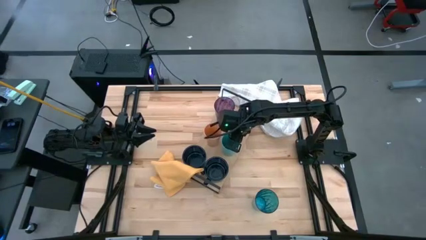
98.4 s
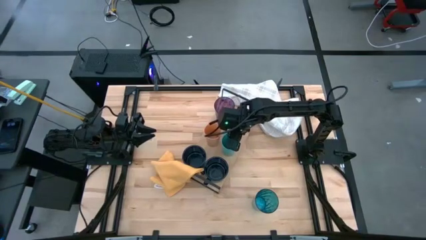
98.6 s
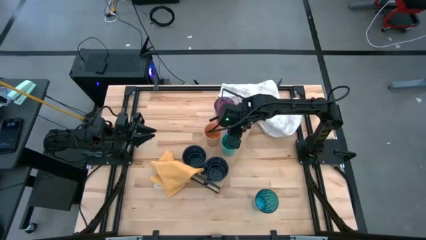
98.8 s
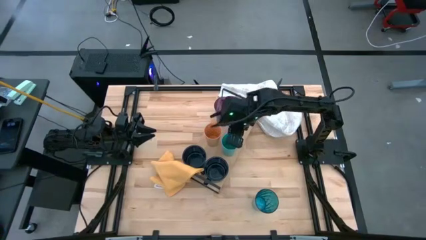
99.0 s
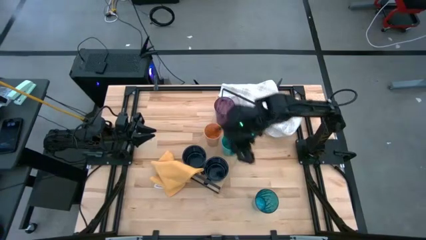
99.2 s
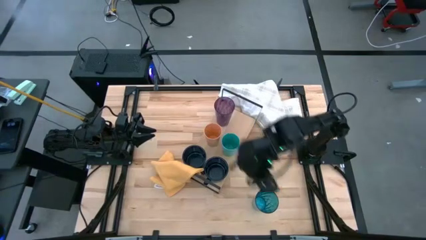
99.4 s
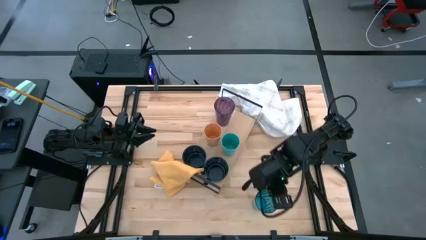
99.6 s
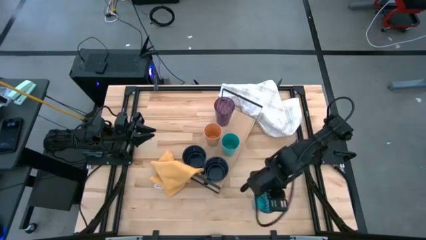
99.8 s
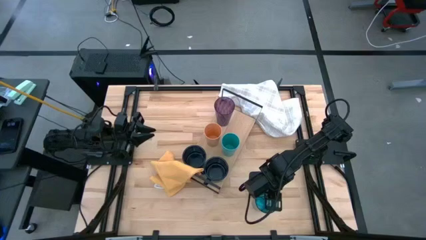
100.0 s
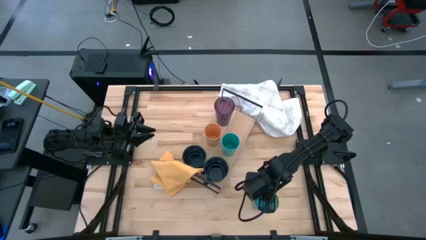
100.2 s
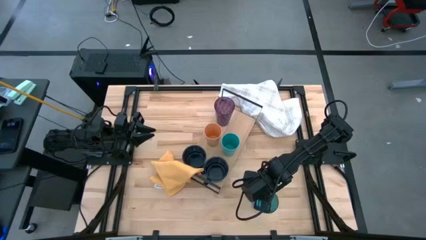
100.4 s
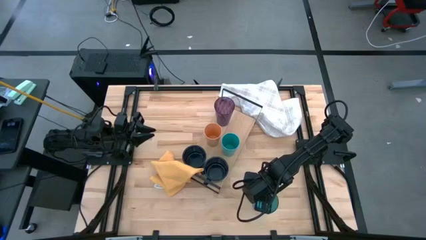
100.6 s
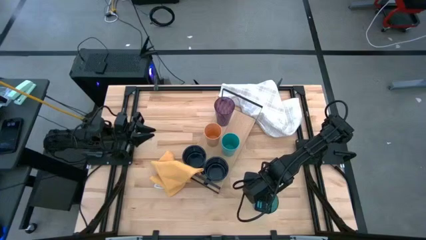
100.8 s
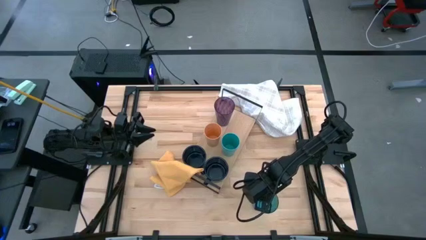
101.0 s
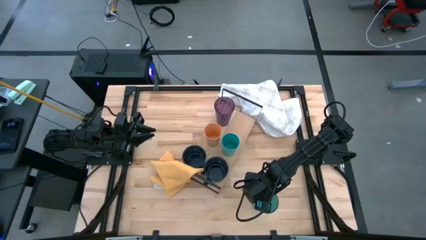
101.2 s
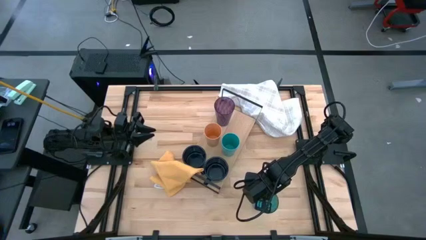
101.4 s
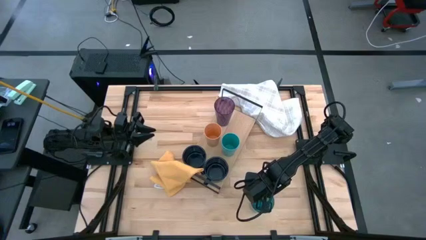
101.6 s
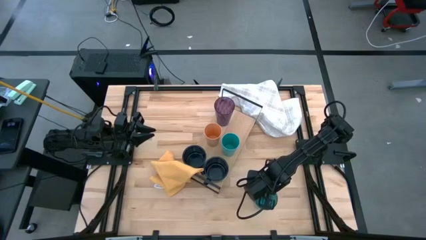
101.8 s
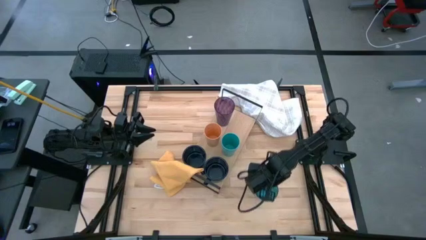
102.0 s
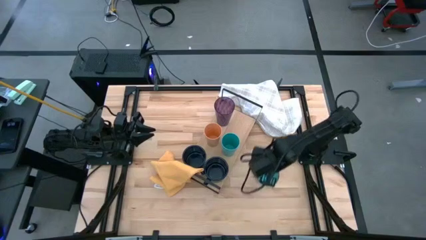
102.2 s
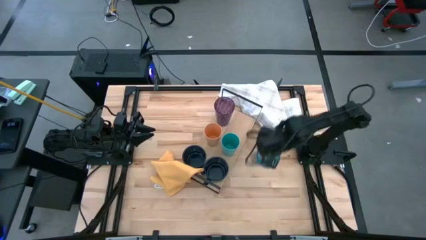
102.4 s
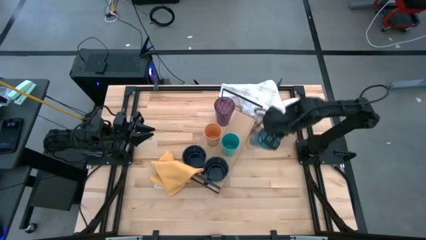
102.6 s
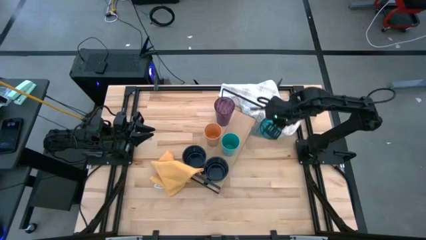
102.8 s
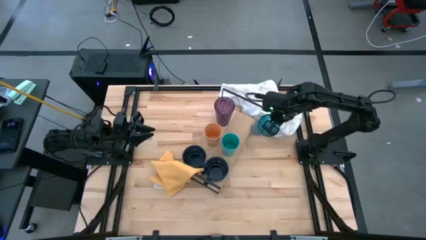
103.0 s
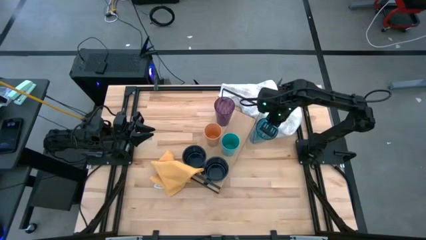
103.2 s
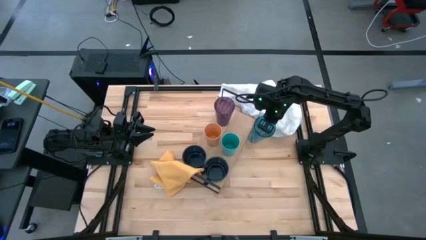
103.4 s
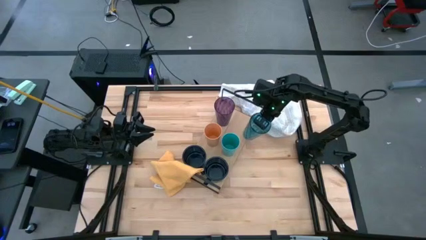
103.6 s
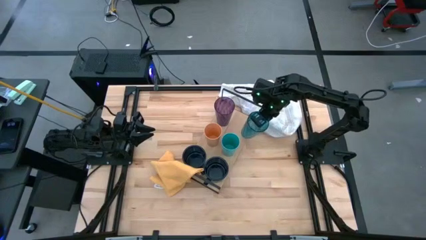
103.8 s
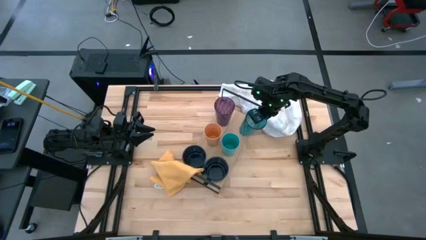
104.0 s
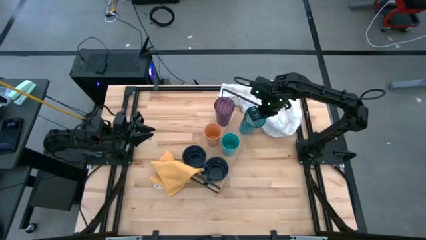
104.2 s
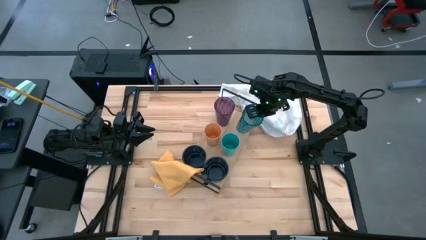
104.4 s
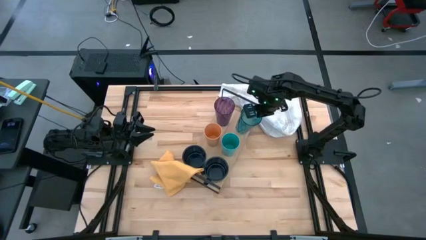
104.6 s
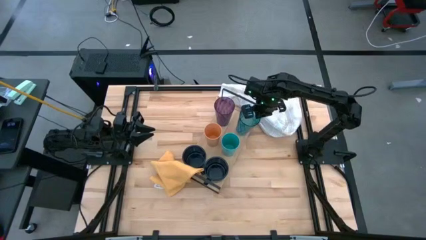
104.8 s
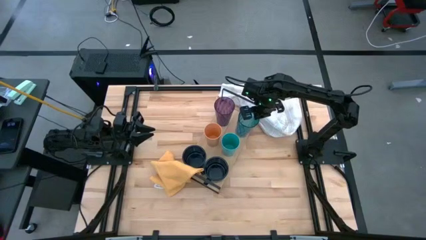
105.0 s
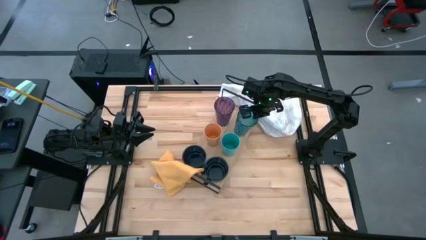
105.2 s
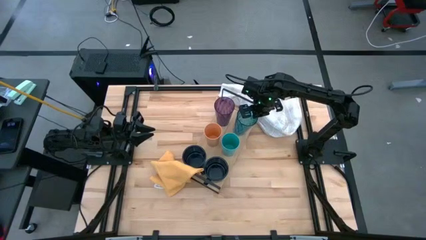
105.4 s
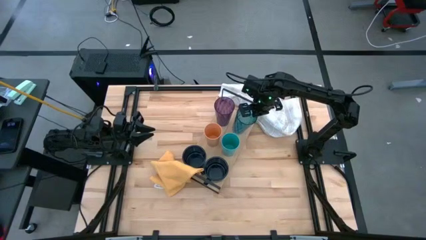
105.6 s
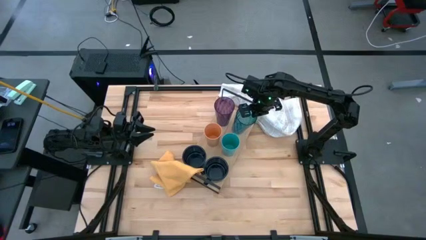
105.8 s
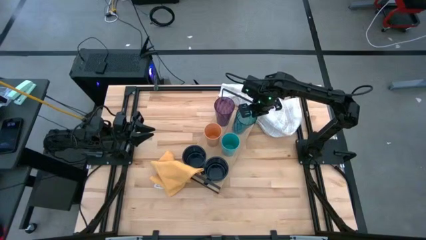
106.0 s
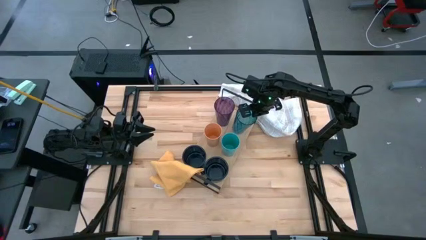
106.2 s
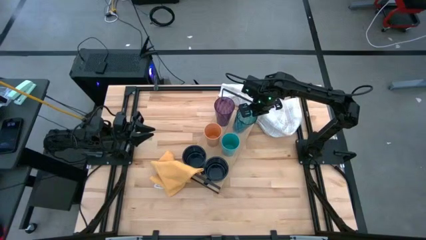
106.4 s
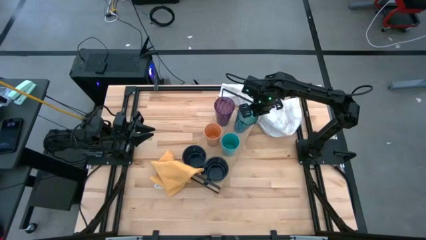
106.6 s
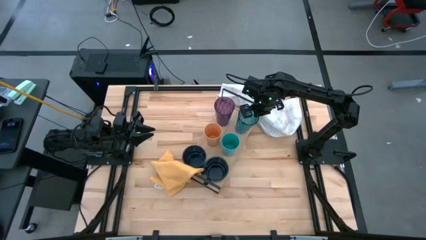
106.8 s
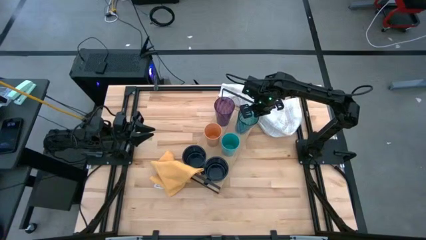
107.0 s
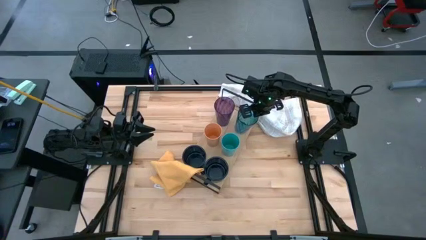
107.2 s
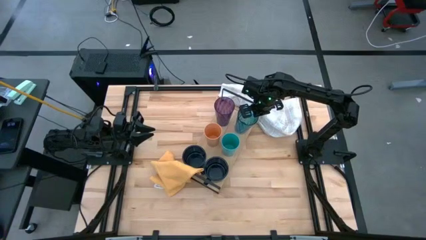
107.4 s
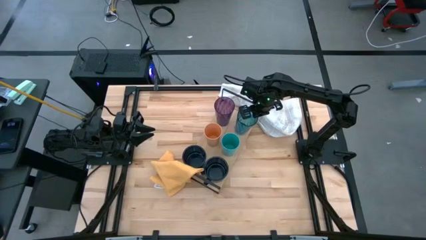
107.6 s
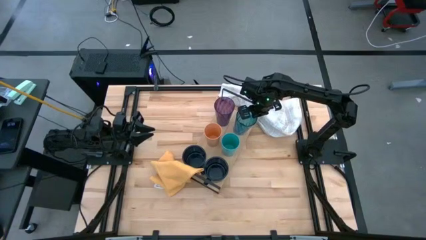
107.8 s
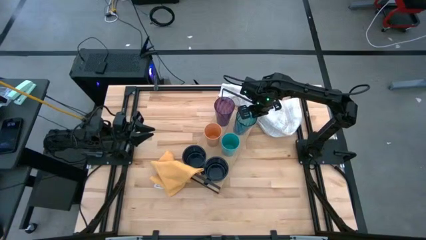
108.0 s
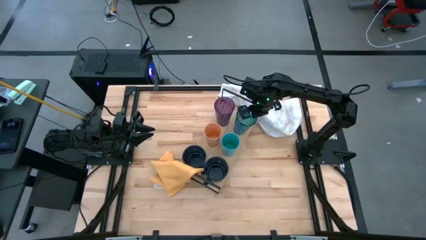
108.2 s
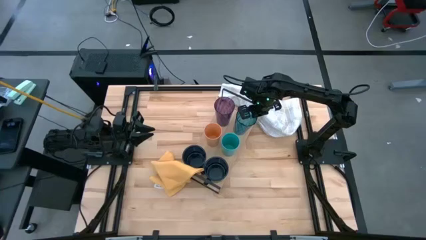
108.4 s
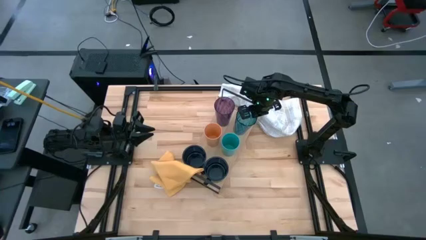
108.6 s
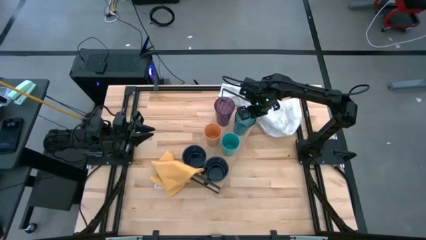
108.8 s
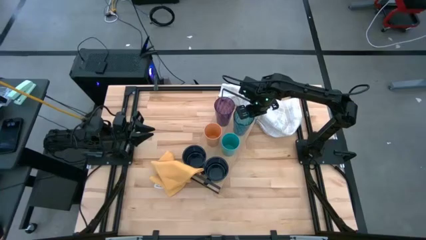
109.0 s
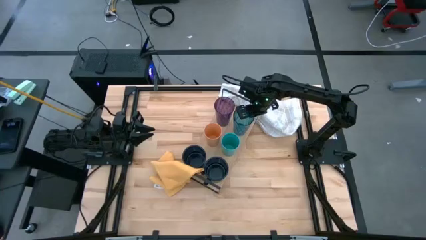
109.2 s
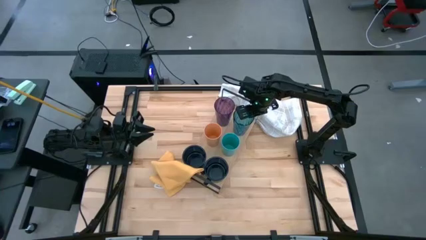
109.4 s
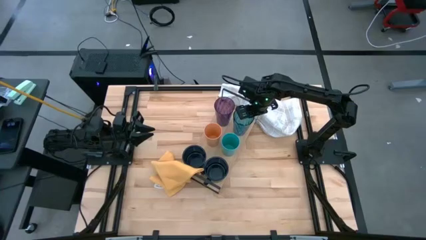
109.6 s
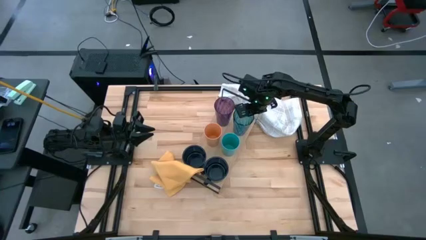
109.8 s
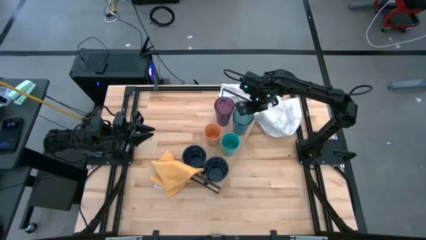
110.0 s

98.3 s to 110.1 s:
Task: Stack small to large cups/mugs on shelf
Put the blue cup on the shelf
